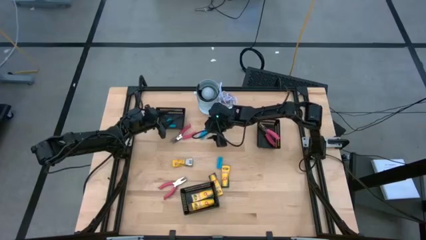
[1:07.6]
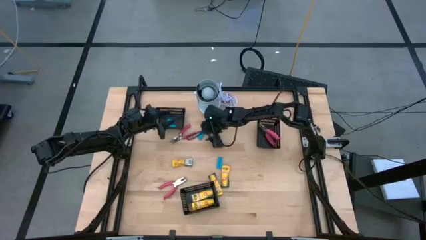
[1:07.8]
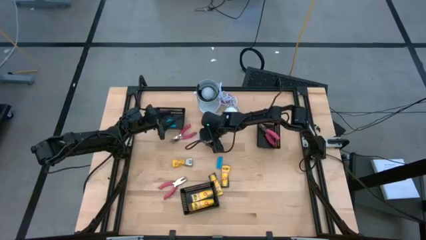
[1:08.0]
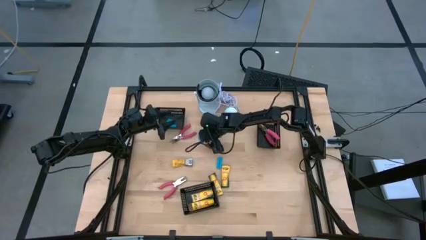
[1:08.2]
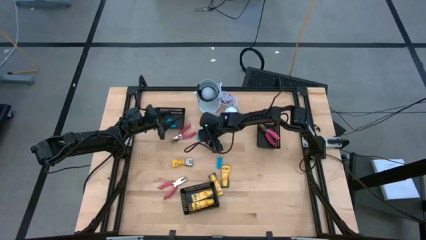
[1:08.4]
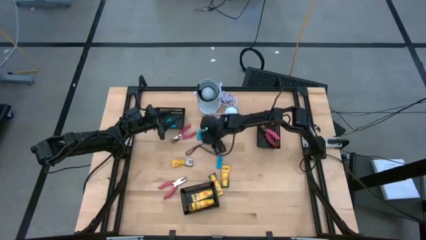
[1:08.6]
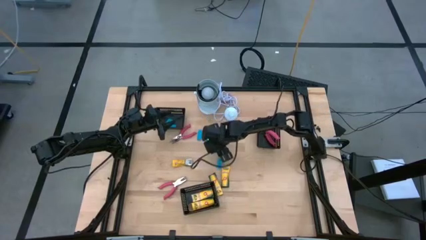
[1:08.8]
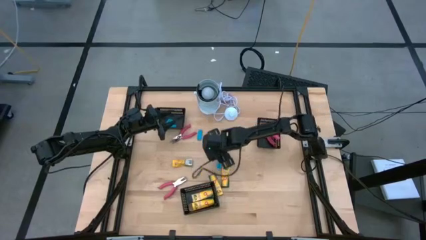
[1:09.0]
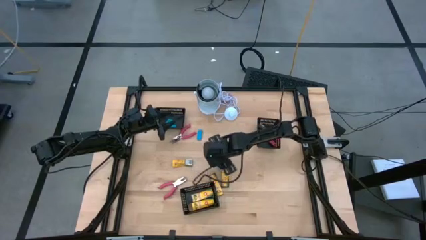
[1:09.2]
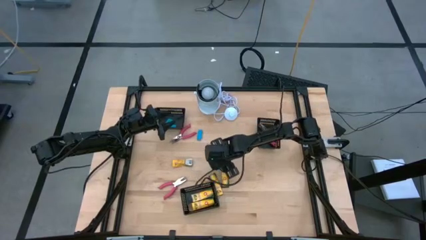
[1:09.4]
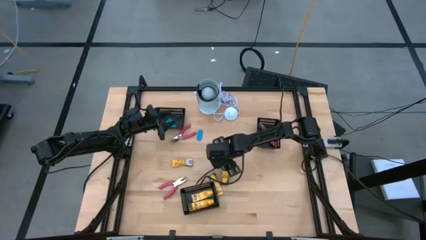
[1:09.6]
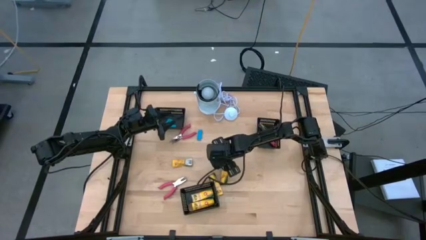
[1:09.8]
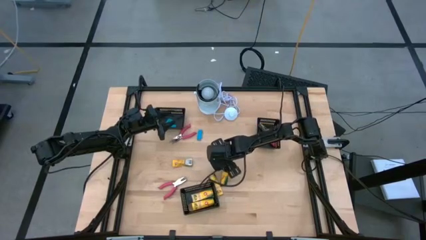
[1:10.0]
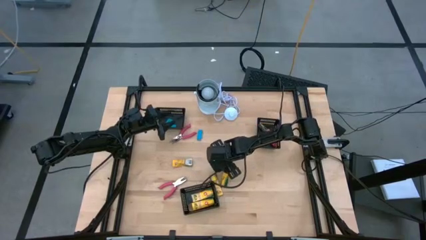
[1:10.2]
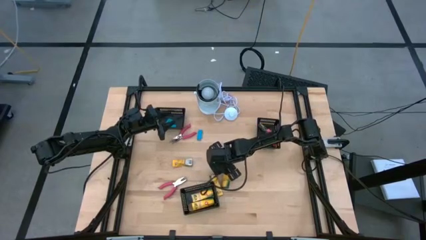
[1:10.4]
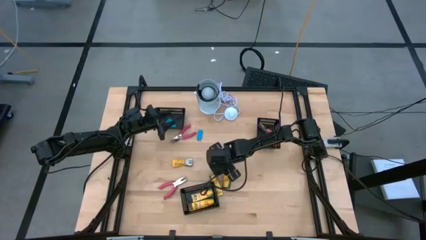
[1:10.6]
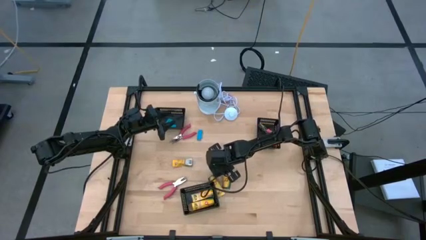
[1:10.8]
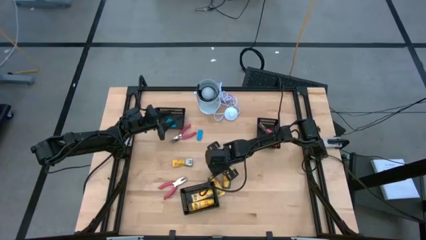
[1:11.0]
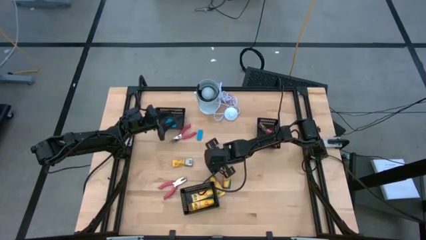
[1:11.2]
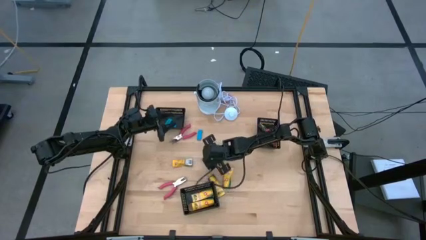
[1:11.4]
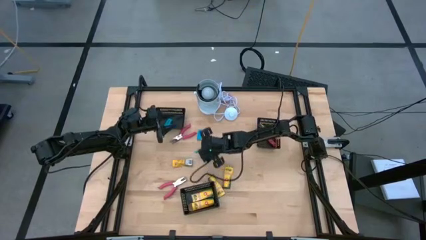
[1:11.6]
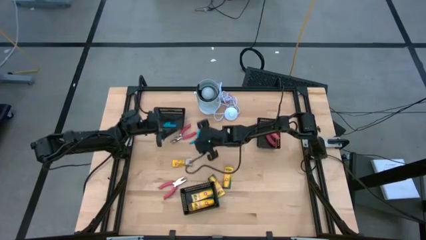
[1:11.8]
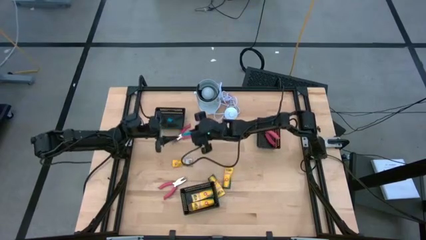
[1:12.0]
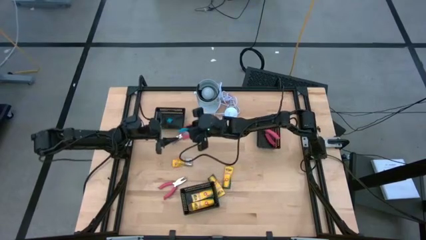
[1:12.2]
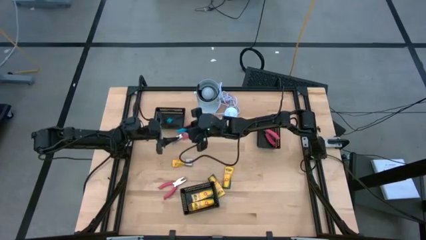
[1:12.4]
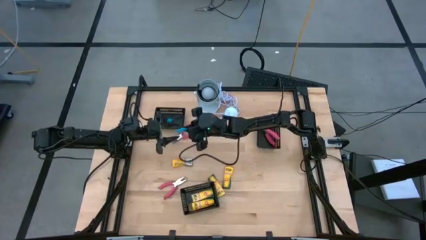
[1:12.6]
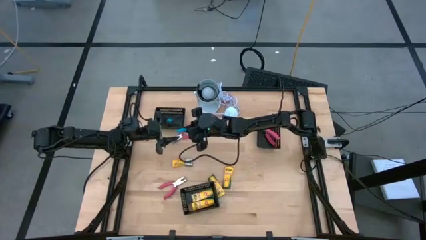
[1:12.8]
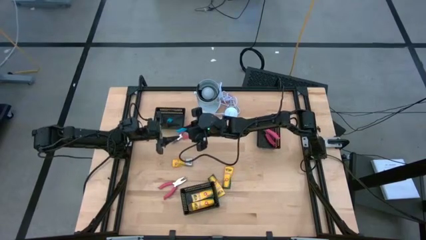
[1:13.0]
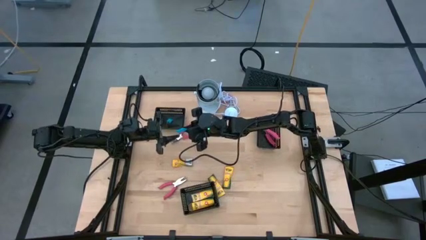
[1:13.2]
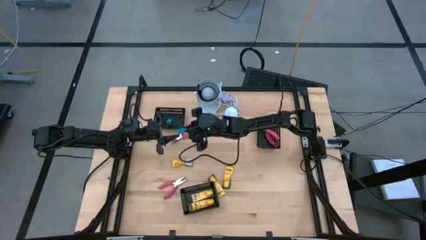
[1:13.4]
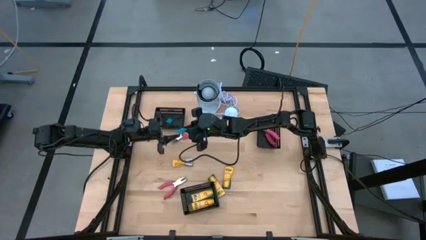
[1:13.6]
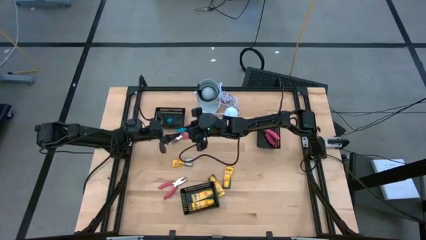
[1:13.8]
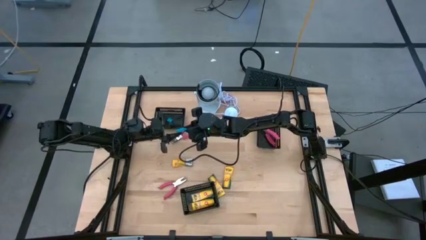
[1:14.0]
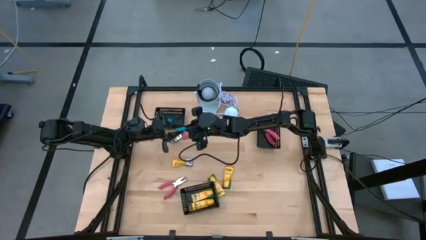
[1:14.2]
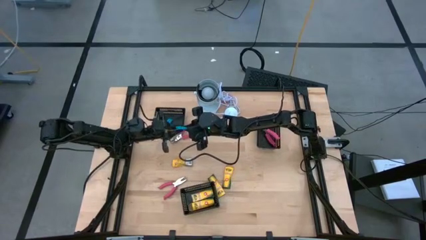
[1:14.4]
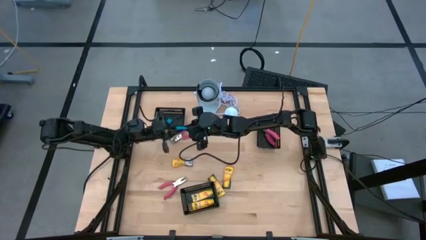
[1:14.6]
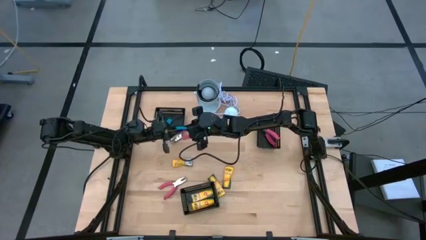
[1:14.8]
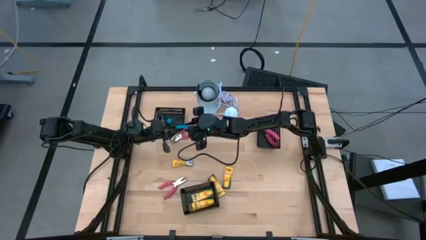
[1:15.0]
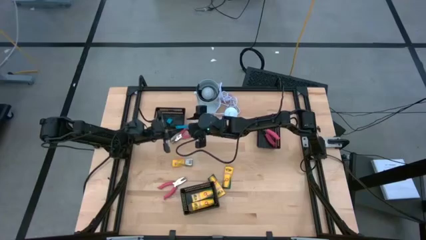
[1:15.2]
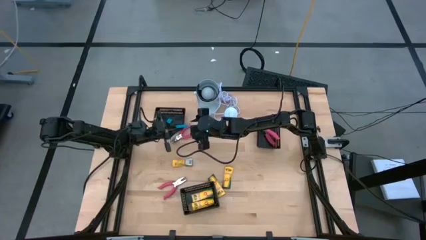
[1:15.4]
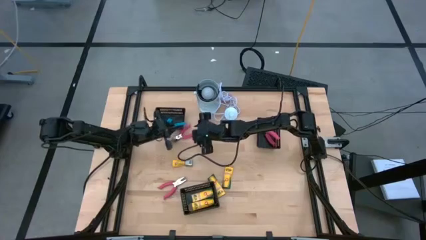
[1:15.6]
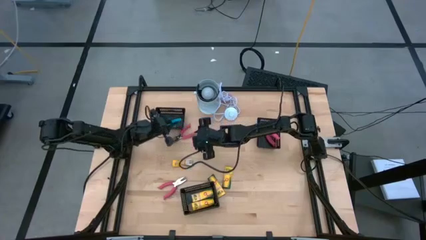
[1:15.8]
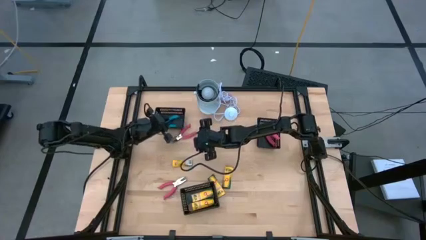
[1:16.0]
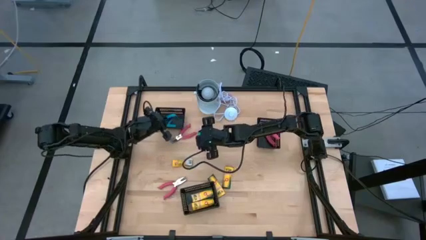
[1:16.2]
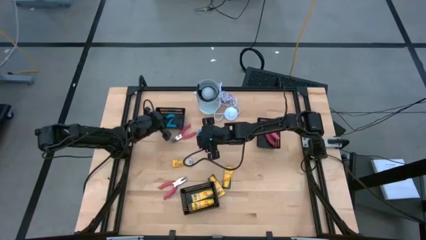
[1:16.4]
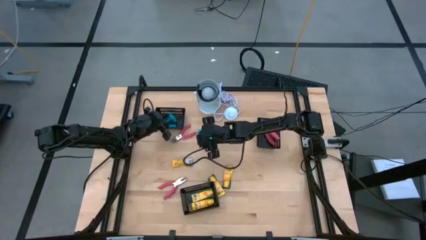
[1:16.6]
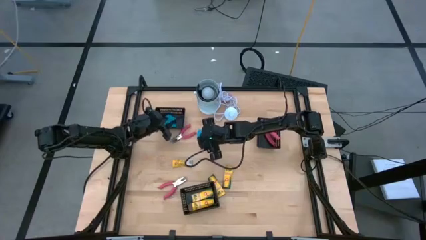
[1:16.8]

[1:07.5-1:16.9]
Task: Pick & Place School Supplies
Put the blue eraser into the top black bin

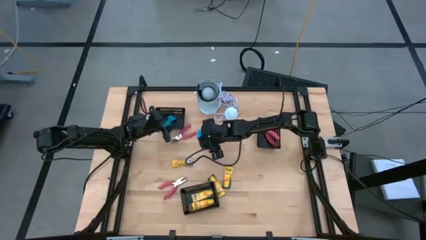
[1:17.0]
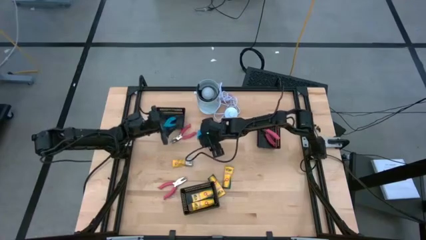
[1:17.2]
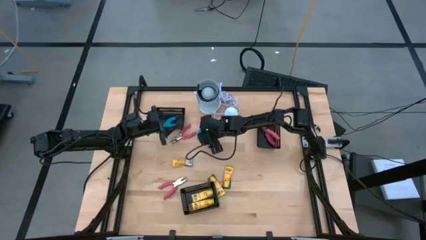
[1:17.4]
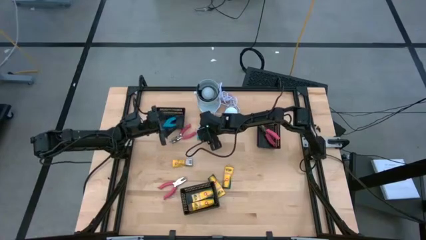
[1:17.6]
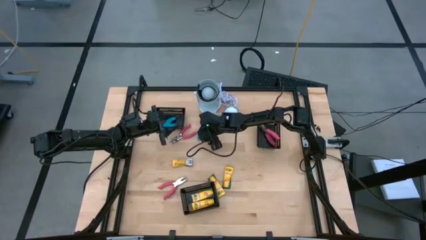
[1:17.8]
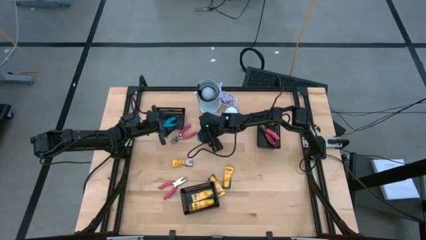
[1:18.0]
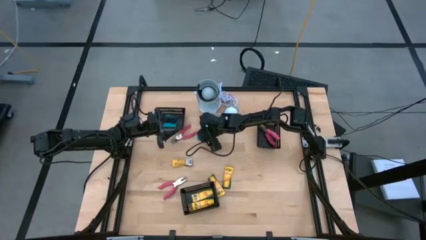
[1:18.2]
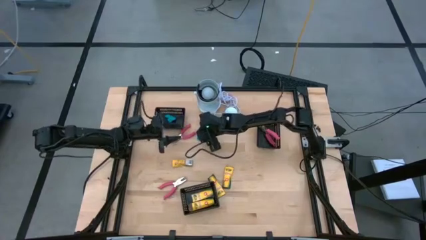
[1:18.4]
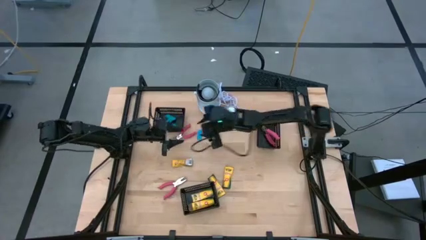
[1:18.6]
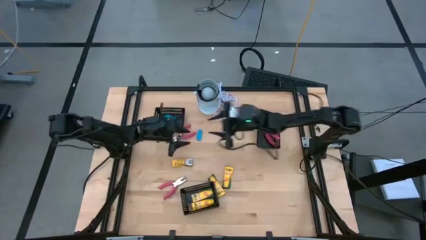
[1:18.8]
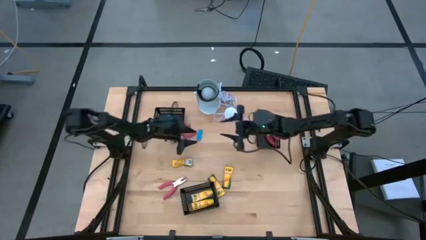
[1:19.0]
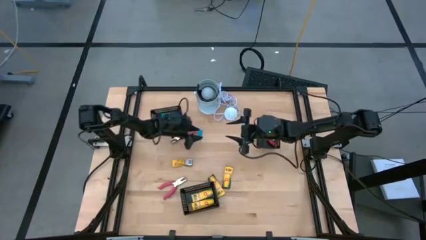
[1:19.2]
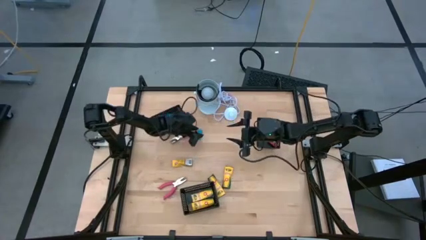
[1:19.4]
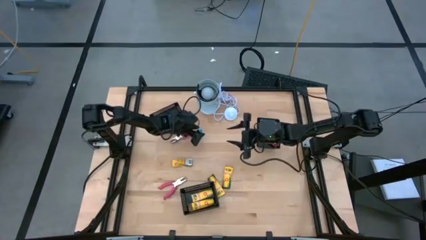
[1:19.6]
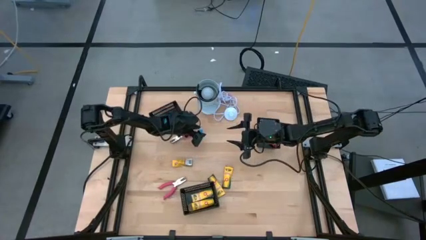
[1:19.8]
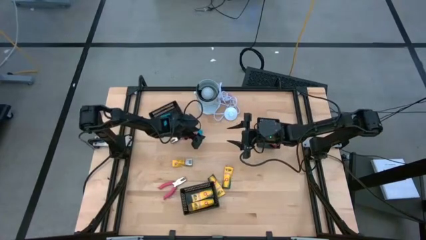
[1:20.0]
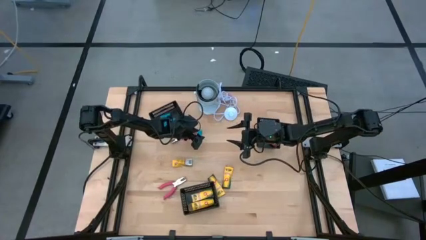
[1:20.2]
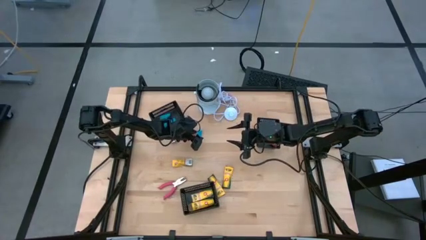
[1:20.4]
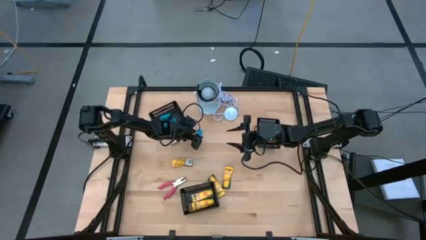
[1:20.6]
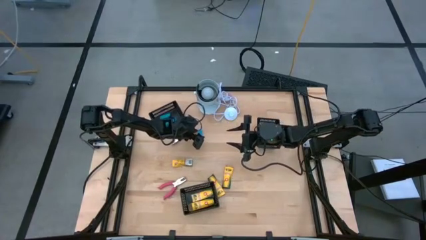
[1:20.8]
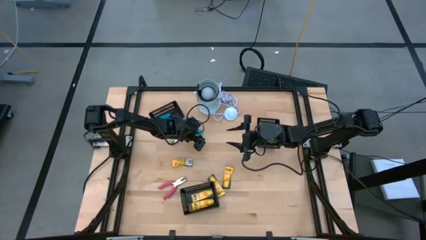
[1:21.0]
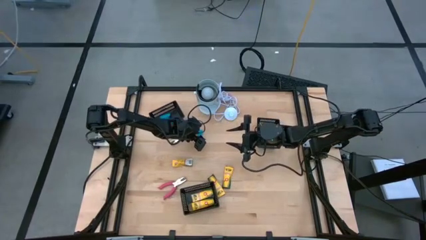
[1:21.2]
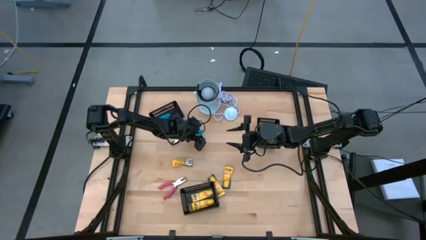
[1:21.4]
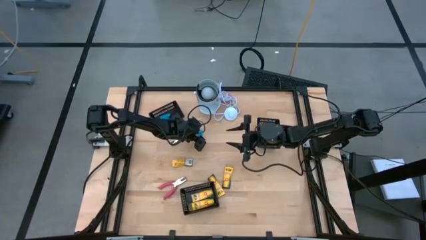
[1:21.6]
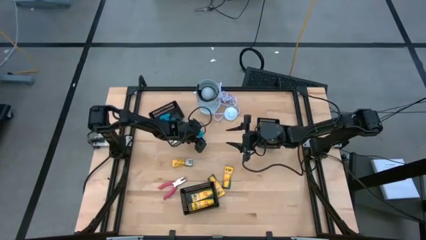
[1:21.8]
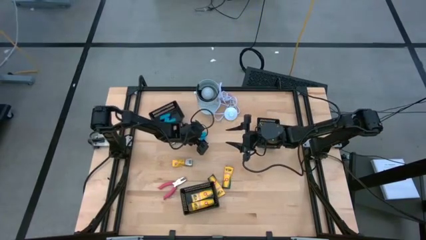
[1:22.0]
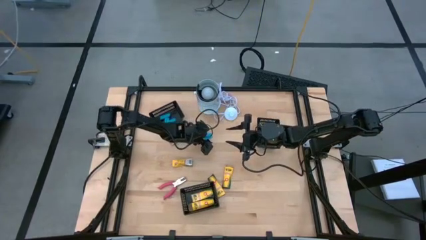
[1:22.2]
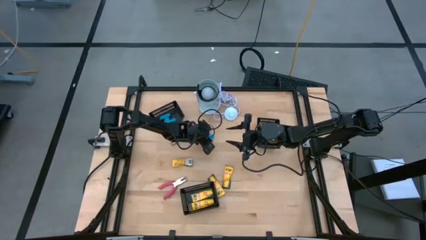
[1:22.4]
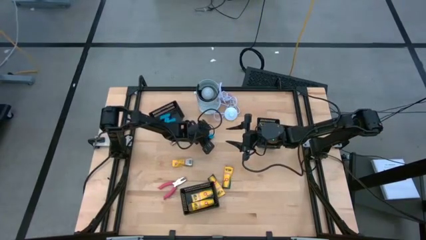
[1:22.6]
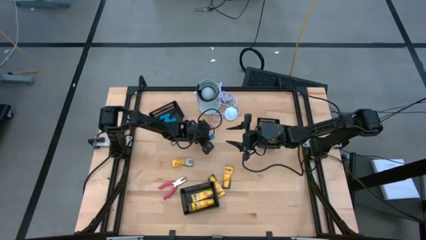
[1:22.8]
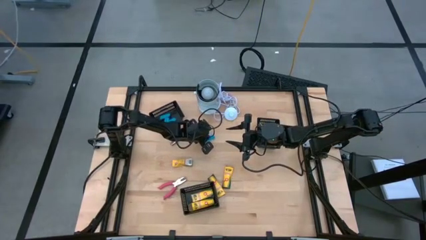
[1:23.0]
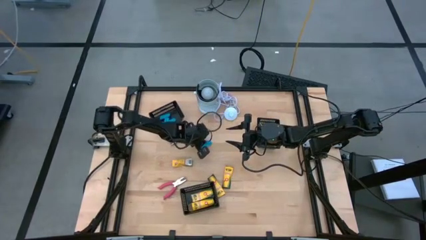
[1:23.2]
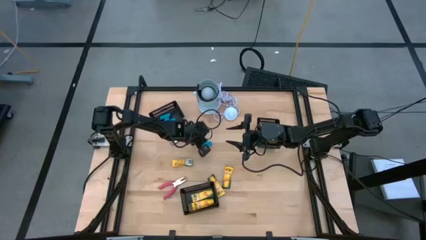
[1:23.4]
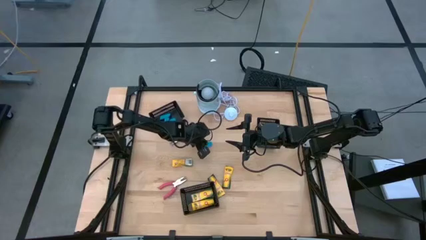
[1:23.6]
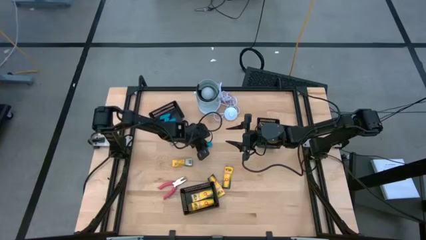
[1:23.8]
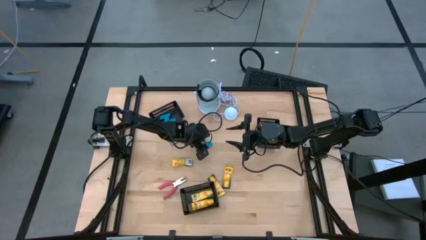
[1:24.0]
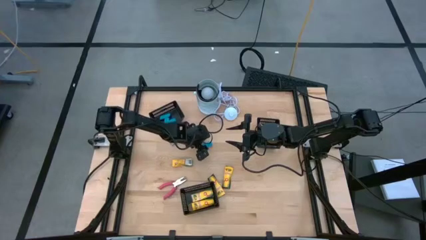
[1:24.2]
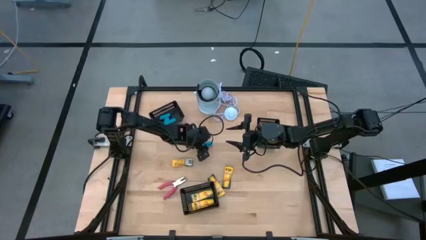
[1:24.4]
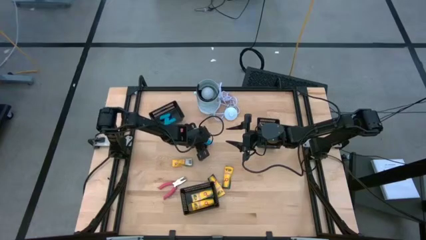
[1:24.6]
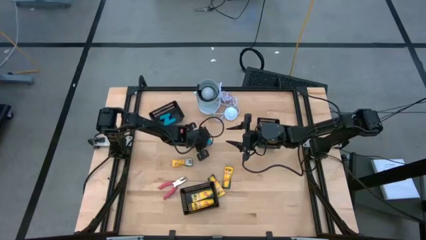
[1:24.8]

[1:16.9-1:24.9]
Put the blue eraser into the top black bin
